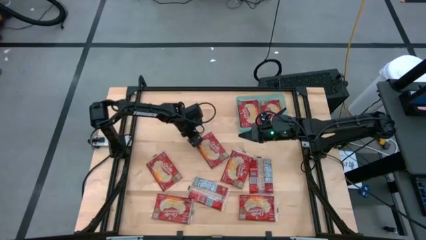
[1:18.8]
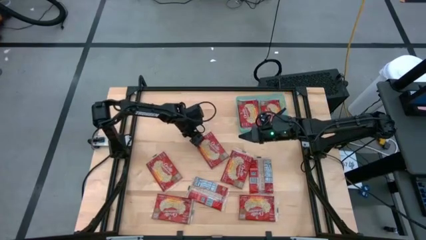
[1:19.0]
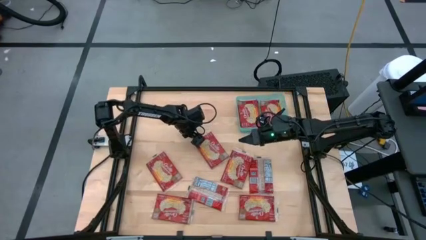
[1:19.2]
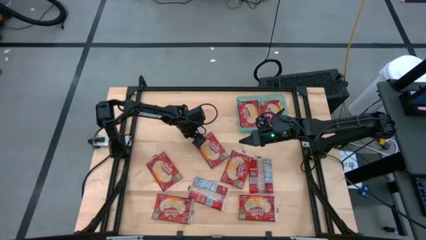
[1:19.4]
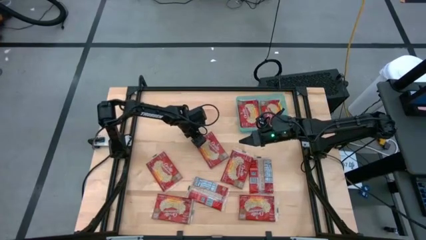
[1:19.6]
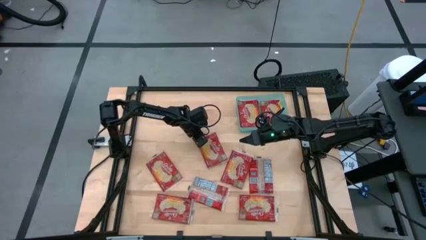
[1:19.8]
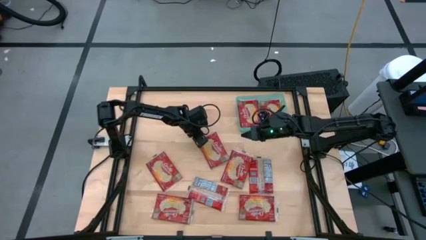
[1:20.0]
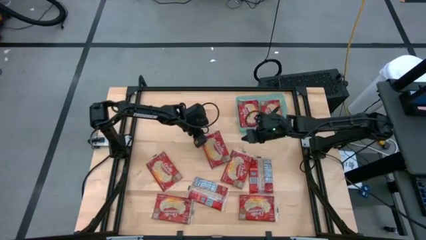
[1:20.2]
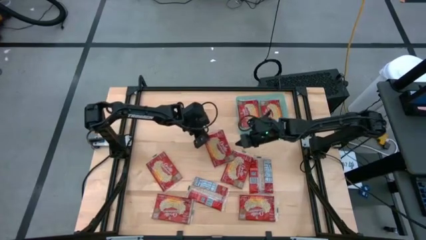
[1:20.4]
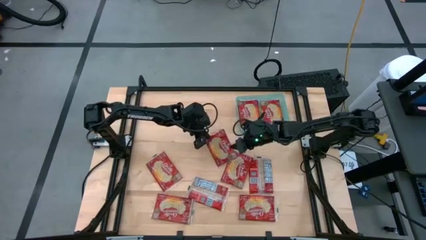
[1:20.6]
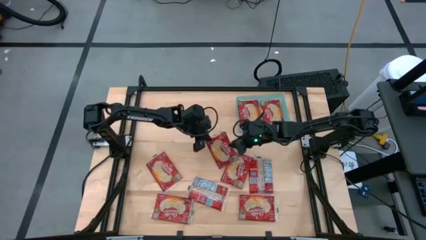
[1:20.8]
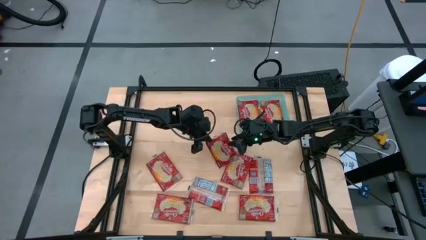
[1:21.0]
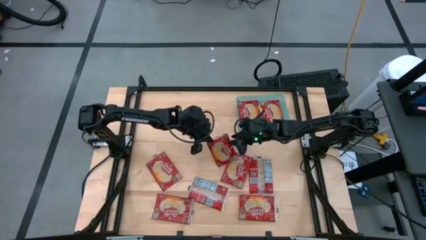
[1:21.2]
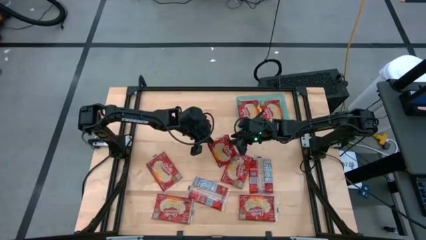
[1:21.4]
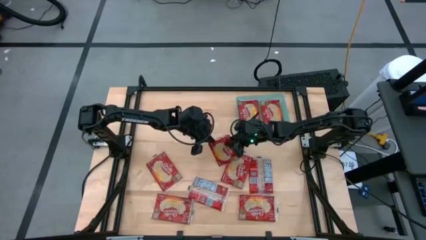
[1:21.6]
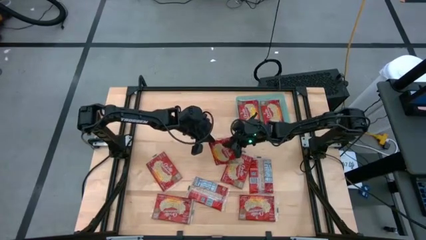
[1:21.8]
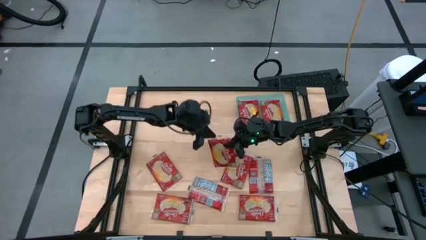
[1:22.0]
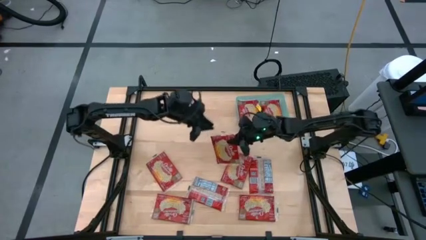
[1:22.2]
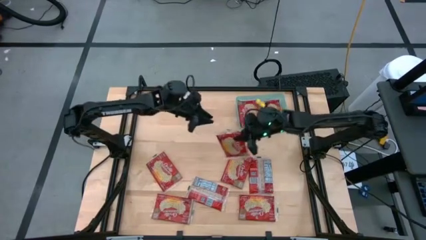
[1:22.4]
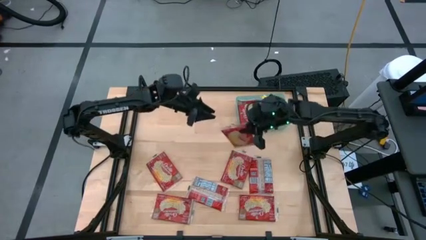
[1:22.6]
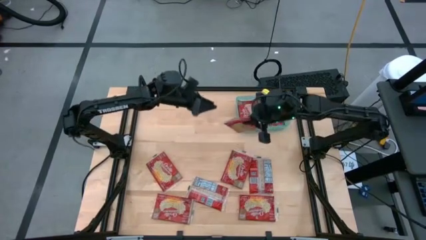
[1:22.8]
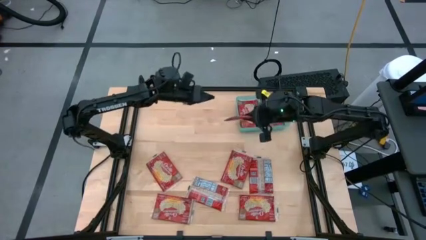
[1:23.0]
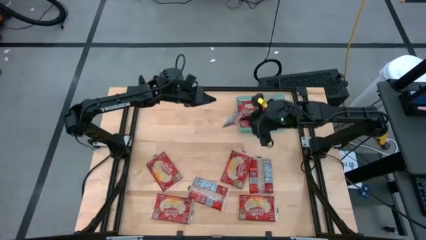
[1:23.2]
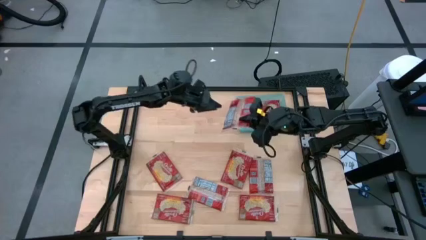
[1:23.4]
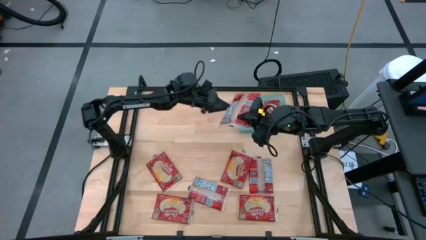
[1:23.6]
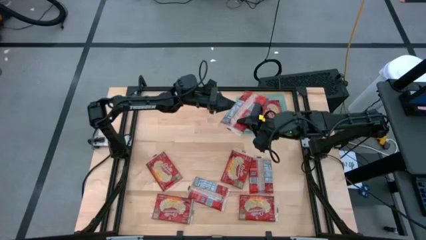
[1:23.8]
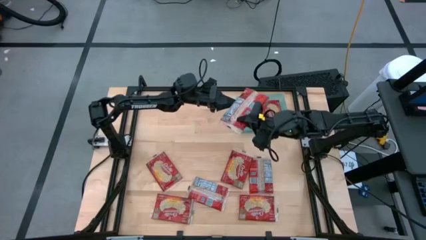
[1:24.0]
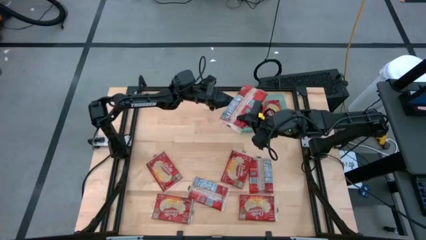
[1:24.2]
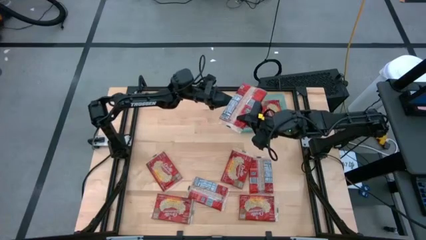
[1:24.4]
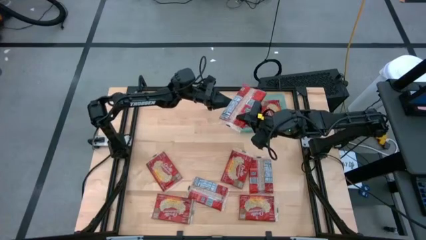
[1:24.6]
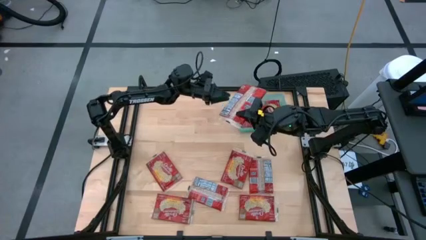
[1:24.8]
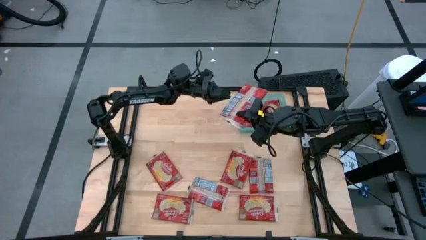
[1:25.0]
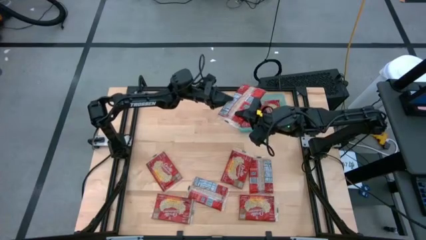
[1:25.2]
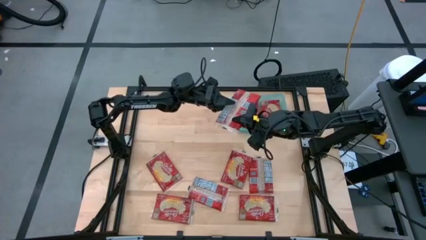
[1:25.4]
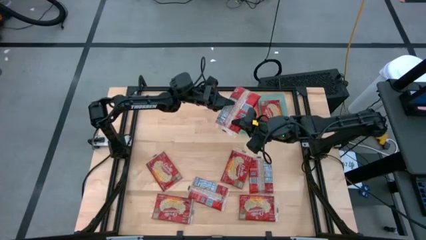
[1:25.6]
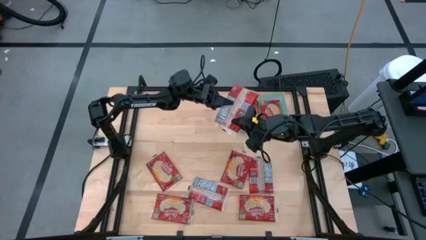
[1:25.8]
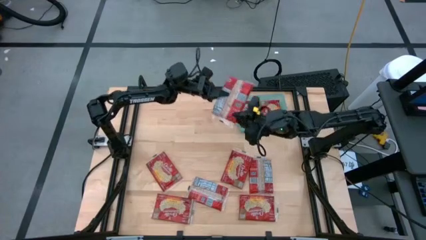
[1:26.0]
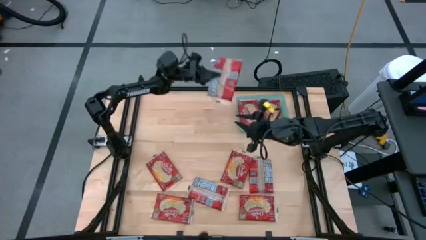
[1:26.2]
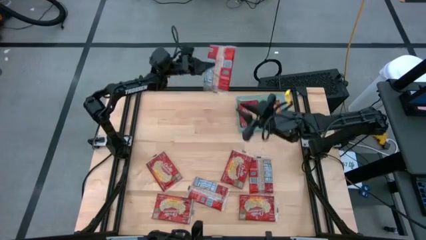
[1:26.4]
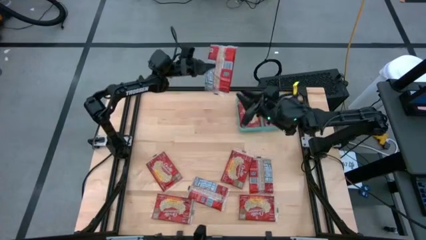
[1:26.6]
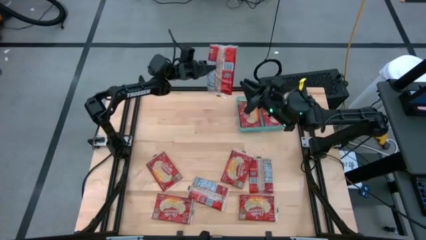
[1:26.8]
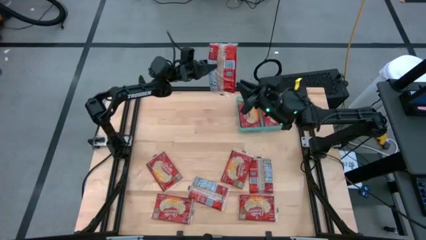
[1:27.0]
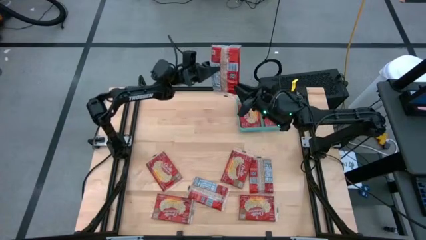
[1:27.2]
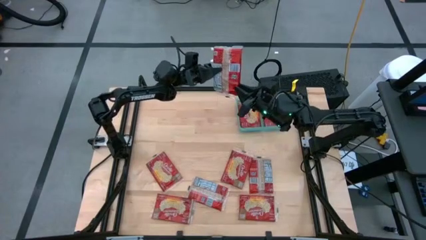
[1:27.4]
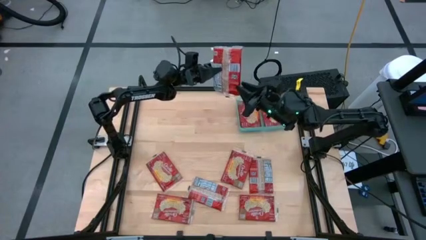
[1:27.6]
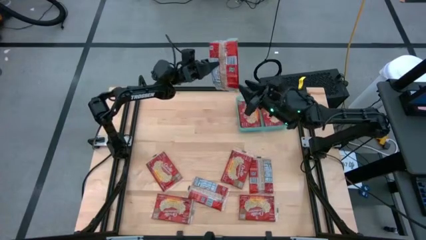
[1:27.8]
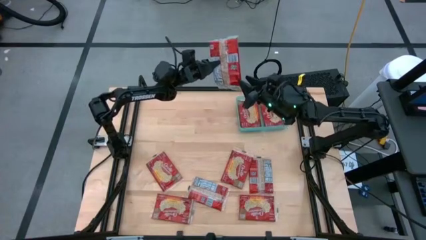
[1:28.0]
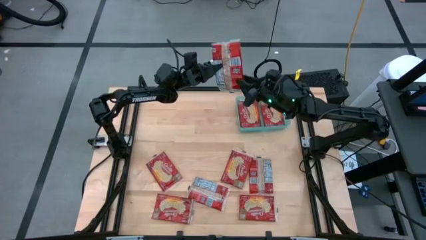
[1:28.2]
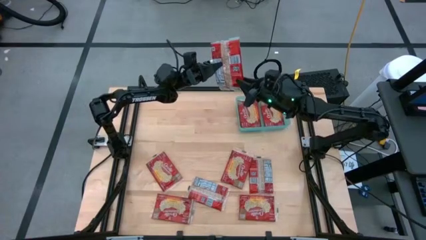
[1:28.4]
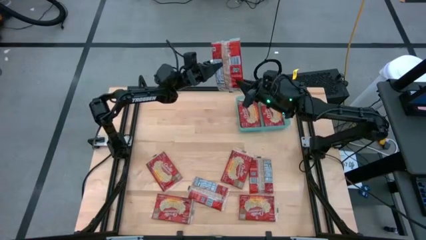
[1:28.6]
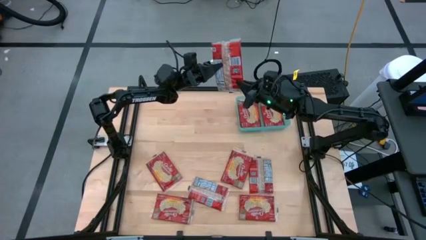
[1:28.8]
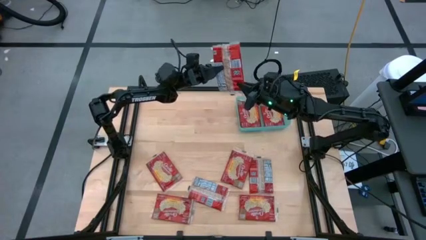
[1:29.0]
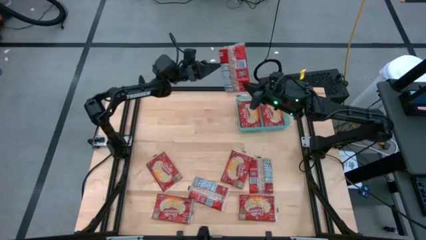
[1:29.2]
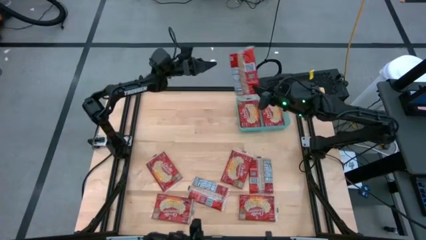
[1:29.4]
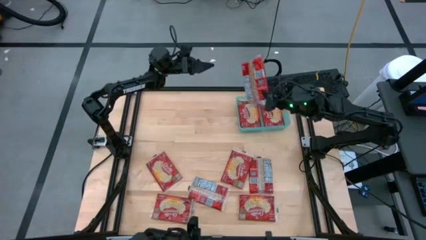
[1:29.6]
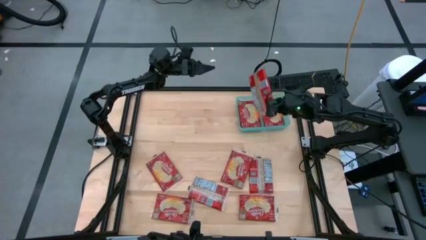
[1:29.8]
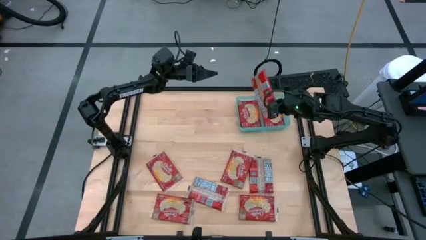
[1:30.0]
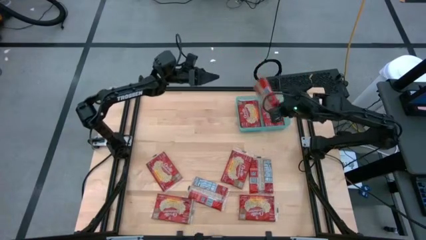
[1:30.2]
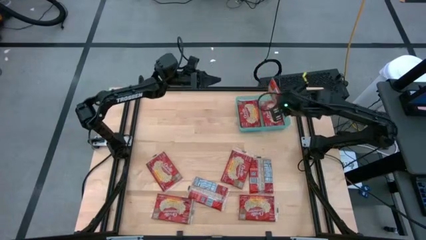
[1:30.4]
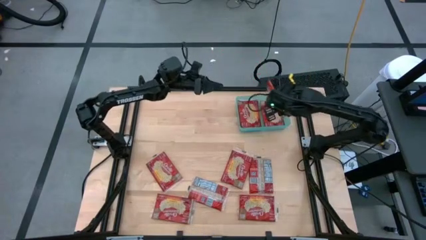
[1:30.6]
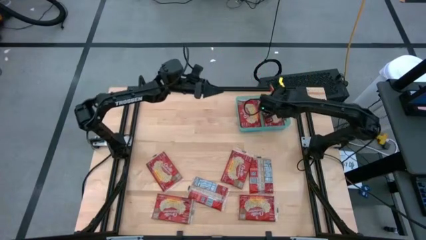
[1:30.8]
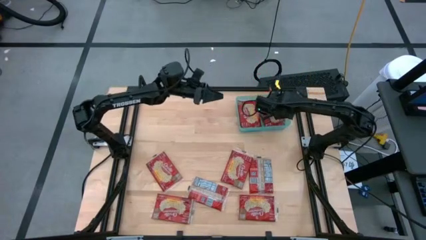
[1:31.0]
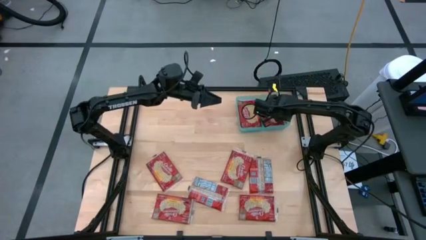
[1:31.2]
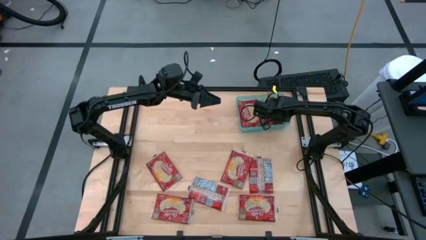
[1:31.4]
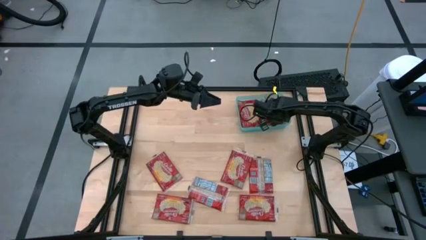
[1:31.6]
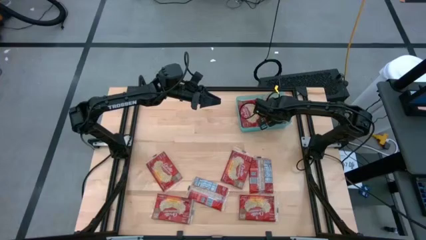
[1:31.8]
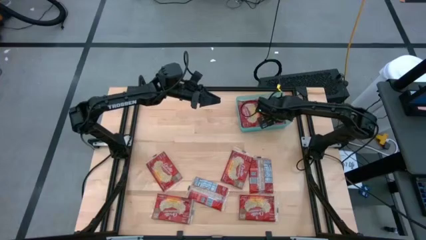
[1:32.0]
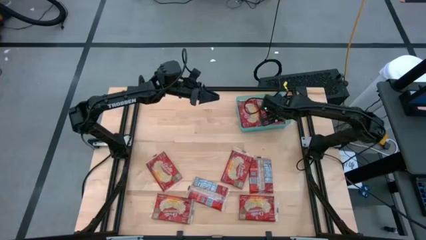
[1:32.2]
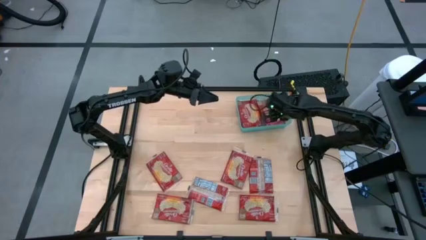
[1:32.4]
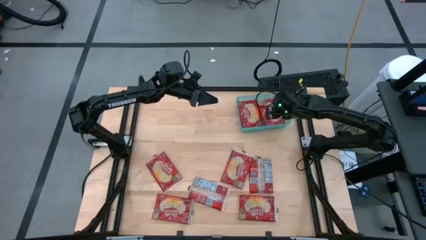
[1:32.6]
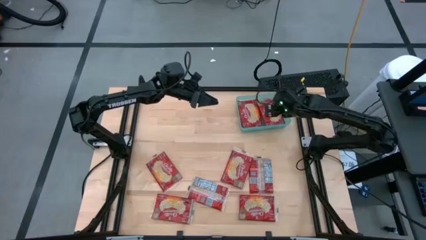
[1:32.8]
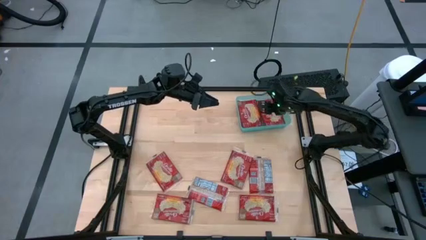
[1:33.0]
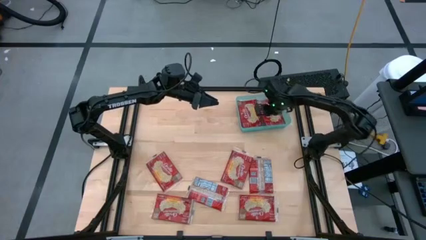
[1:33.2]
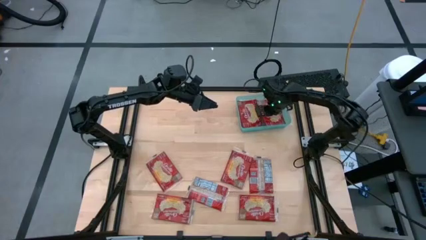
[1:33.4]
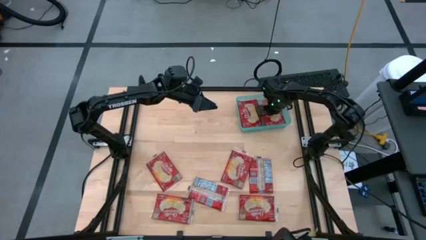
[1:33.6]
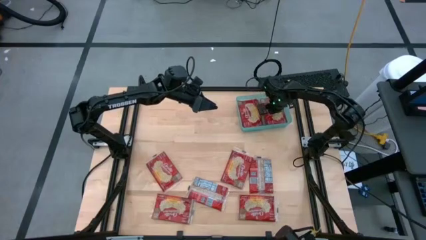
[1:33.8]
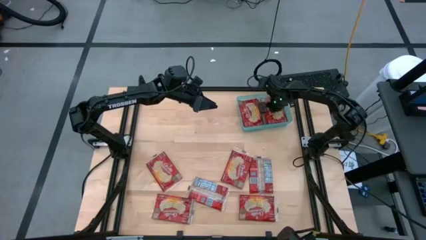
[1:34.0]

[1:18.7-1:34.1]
Task: Sort popcorn bags into baskets
Put the red popcorn bag into the light blue bin

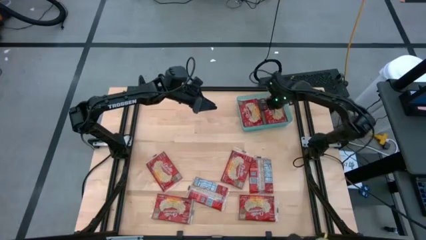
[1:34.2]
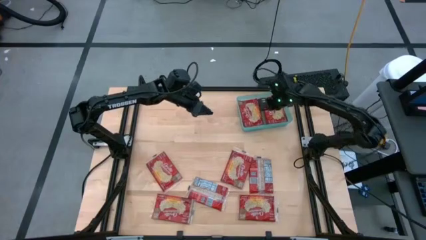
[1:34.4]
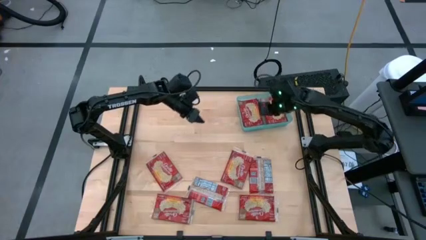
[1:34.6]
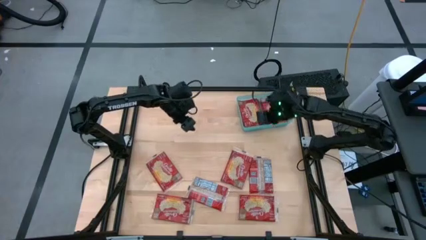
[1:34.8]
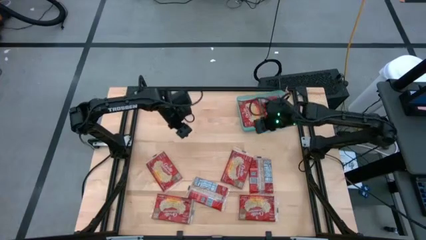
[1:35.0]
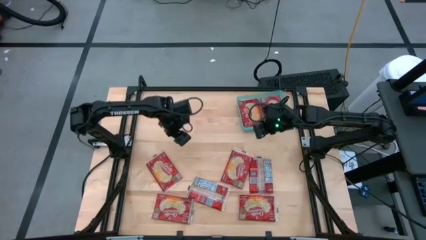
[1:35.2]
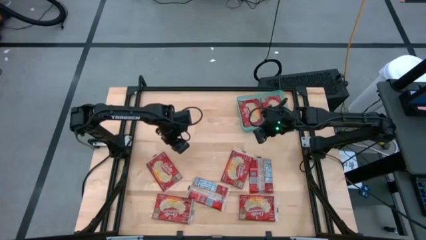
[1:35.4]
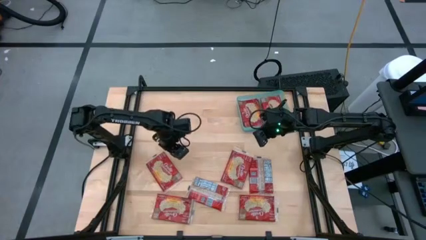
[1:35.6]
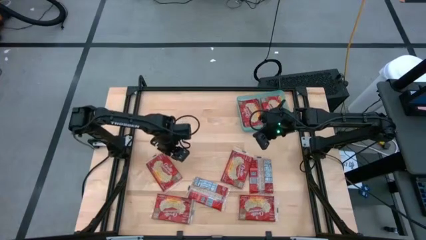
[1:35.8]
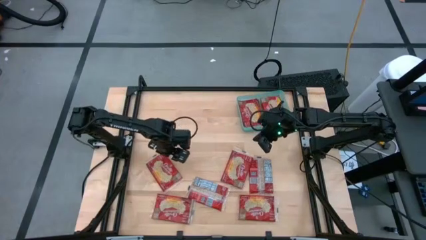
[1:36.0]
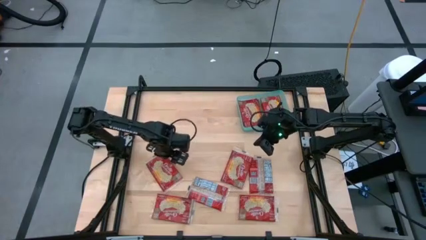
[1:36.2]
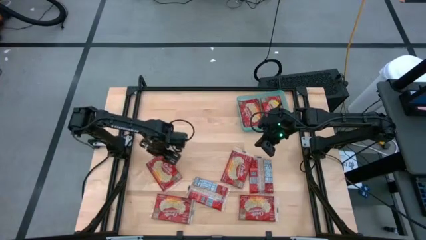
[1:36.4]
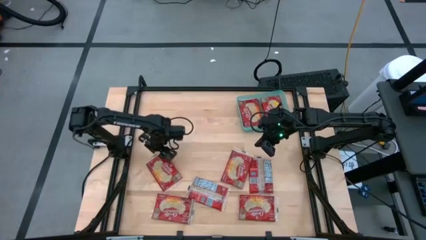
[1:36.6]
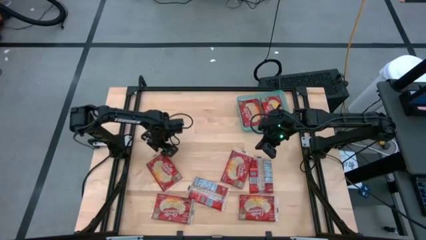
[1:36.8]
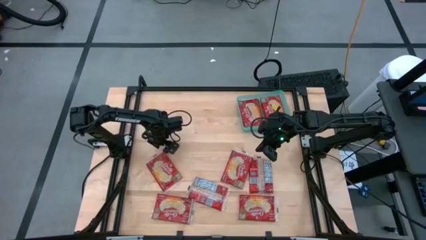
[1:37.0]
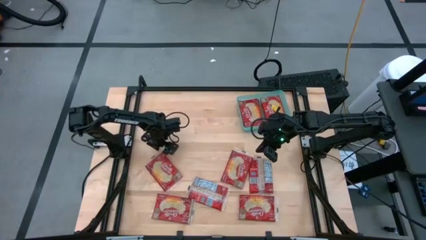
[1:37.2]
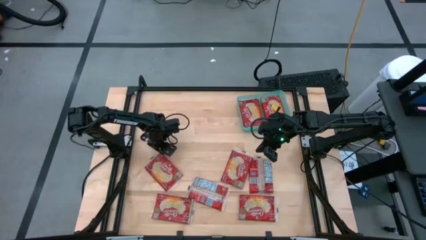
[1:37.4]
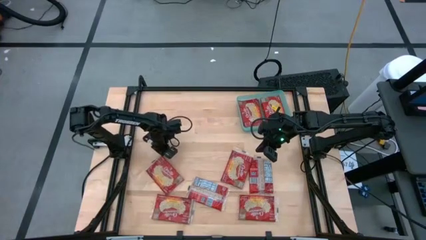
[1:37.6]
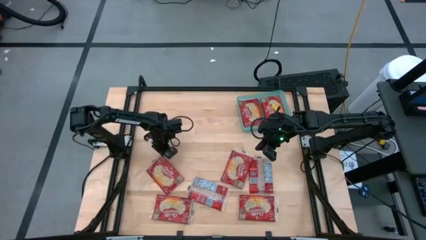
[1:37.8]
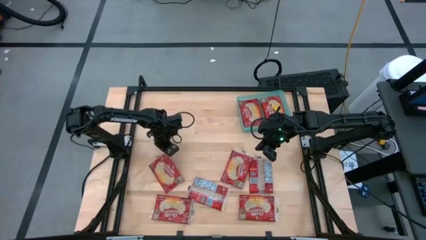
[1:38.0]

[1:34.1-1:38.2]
Put the red popcorn bag into the light blue bin
